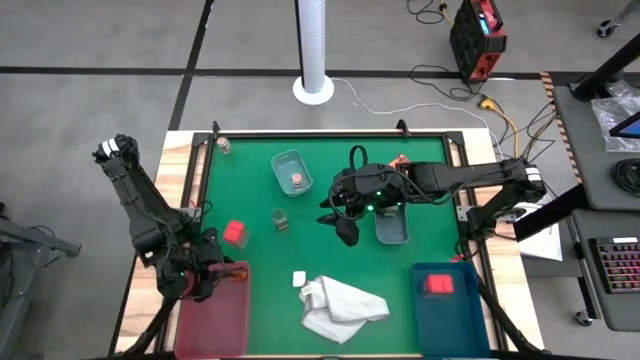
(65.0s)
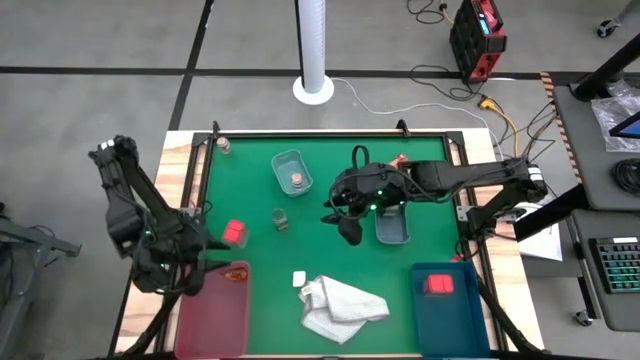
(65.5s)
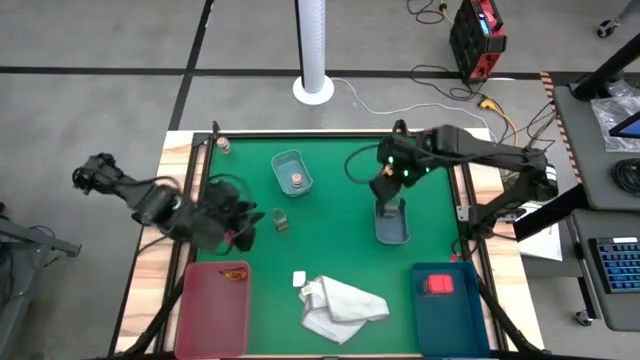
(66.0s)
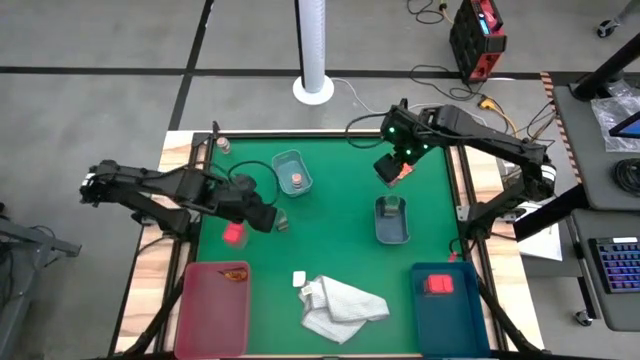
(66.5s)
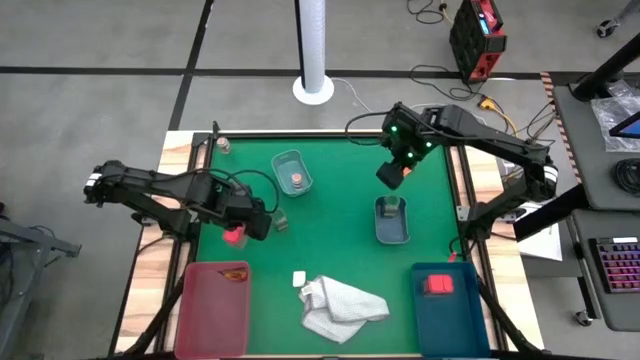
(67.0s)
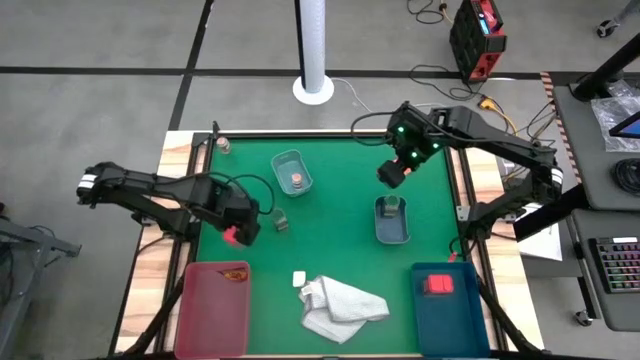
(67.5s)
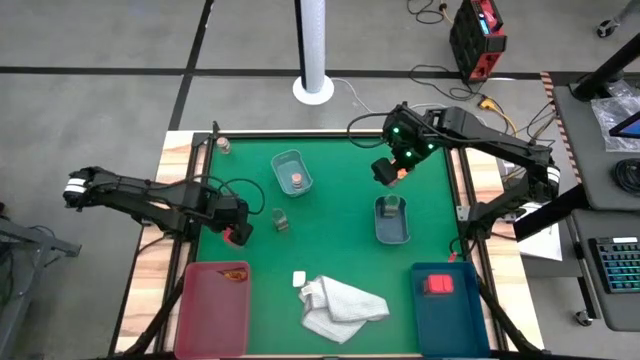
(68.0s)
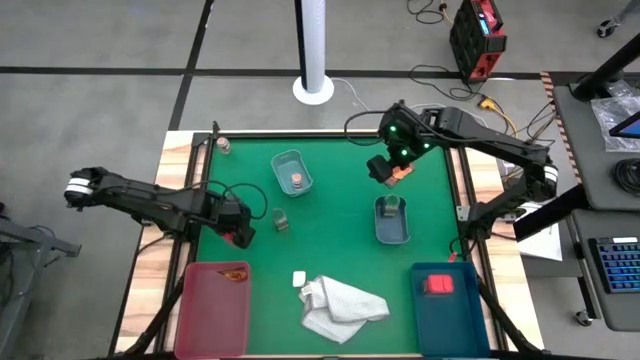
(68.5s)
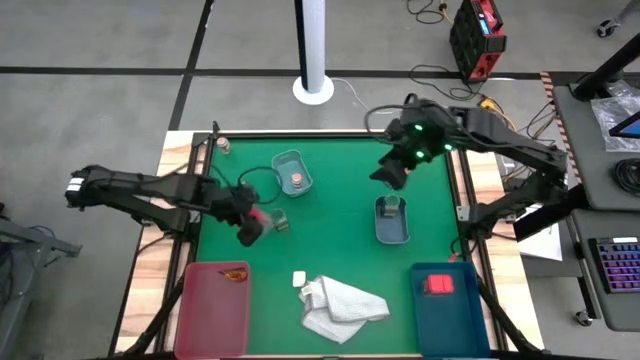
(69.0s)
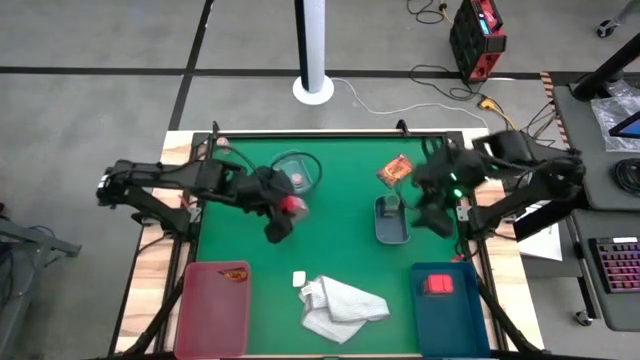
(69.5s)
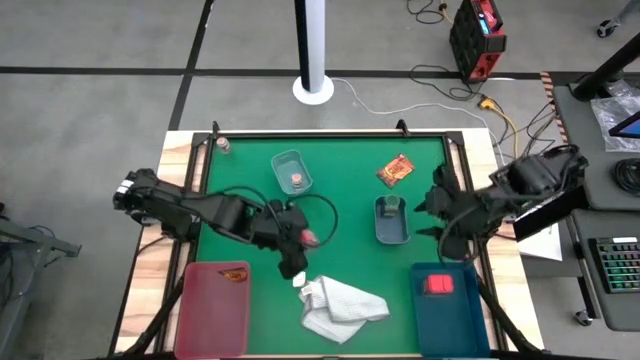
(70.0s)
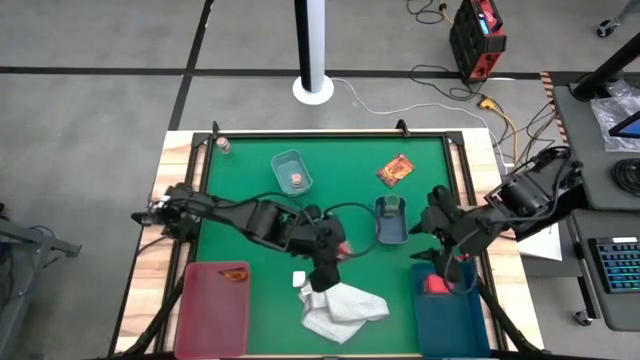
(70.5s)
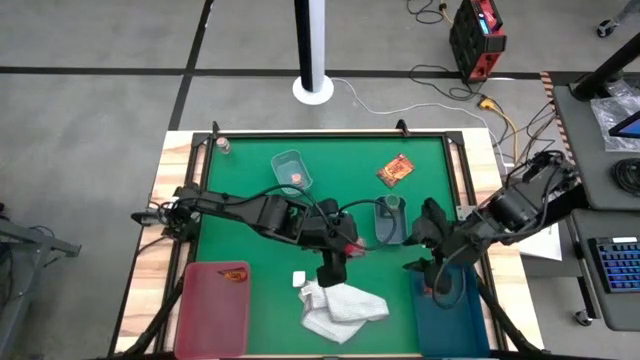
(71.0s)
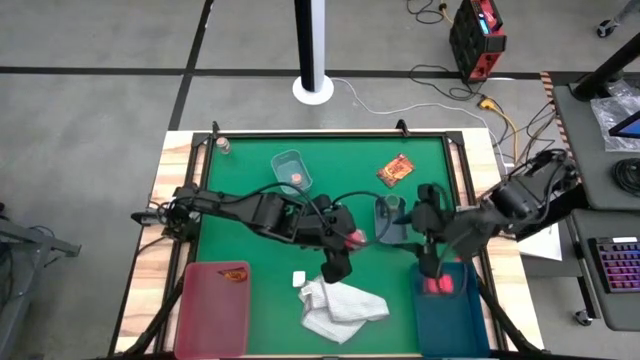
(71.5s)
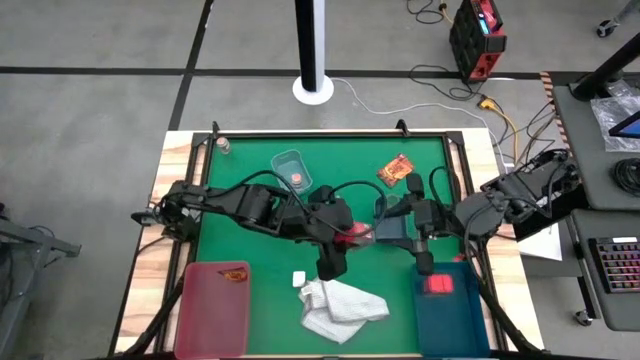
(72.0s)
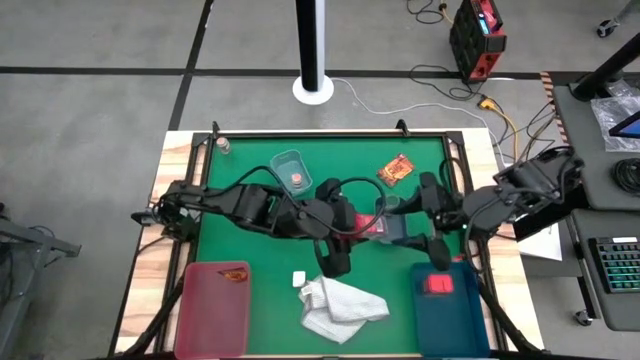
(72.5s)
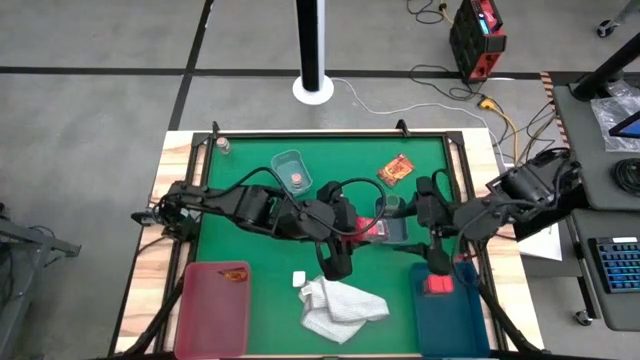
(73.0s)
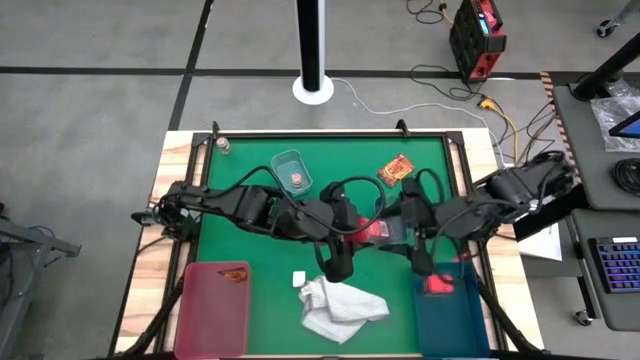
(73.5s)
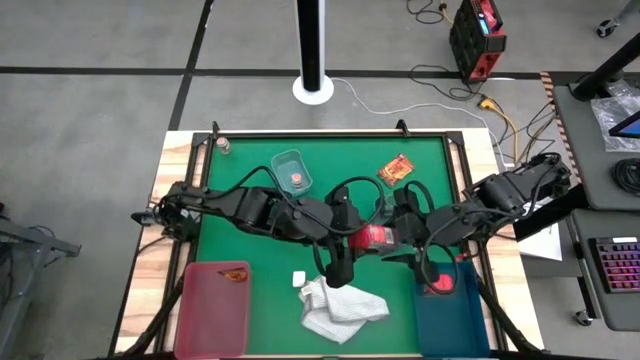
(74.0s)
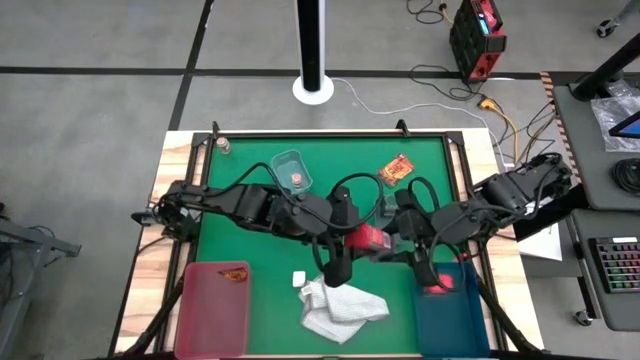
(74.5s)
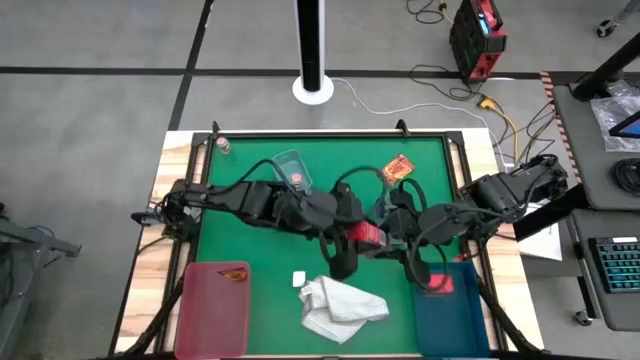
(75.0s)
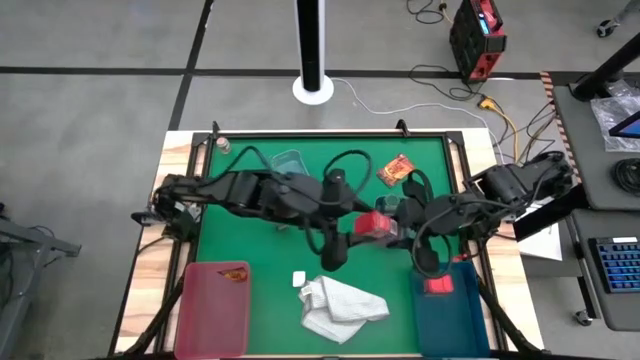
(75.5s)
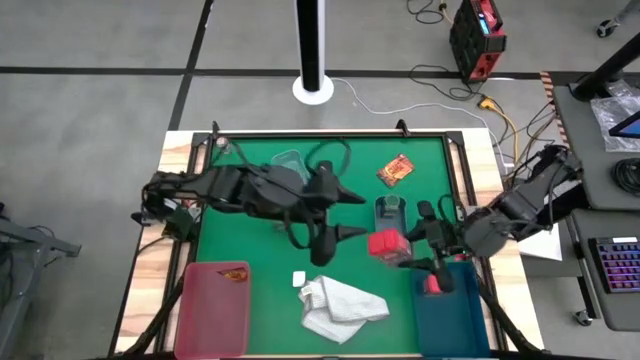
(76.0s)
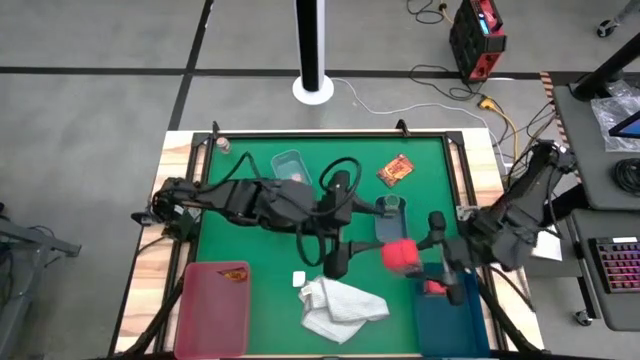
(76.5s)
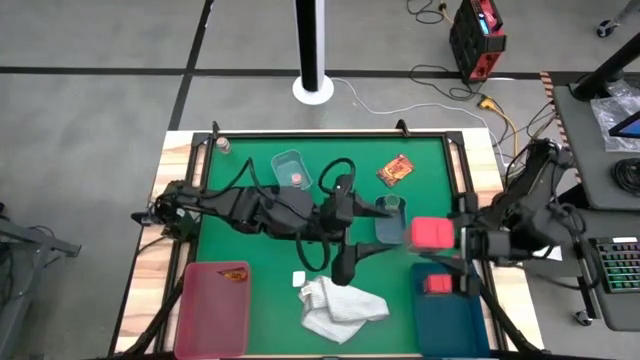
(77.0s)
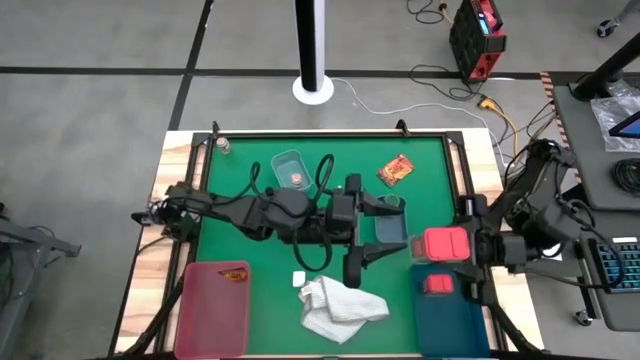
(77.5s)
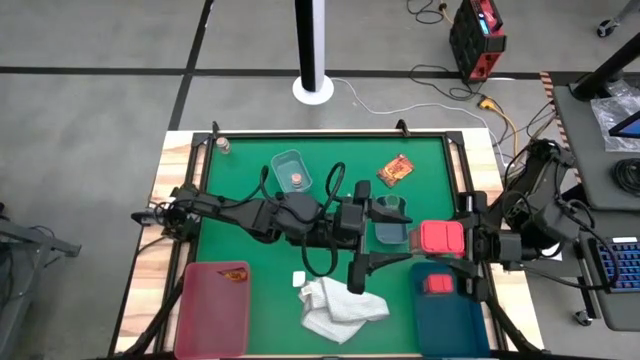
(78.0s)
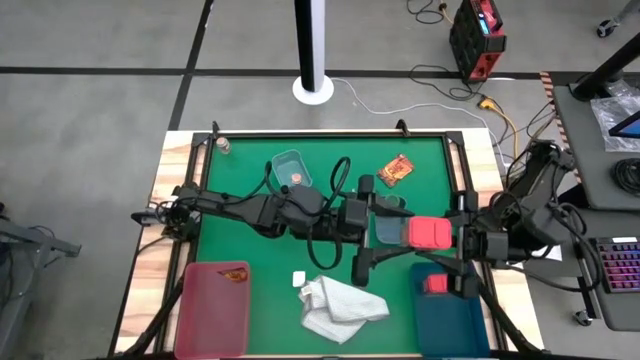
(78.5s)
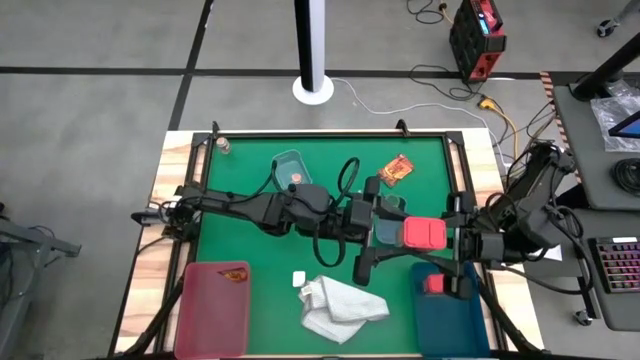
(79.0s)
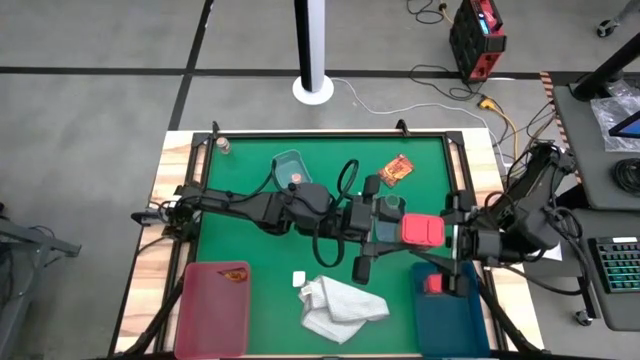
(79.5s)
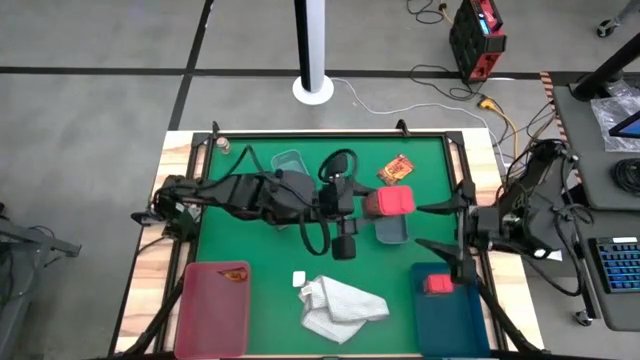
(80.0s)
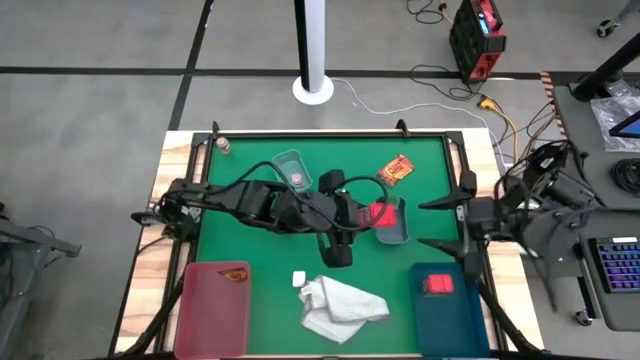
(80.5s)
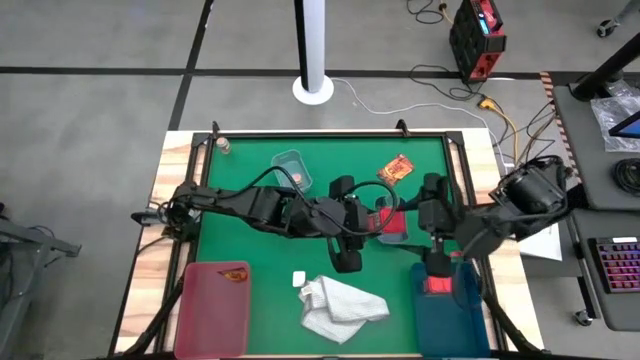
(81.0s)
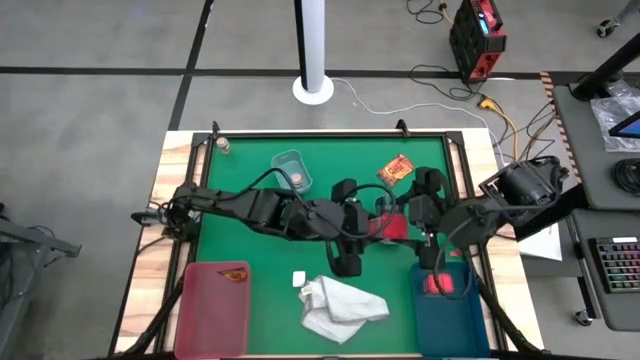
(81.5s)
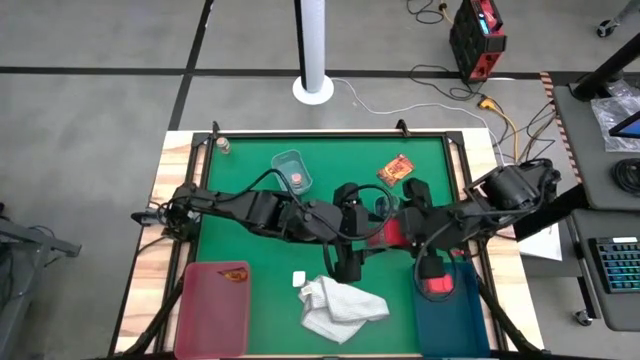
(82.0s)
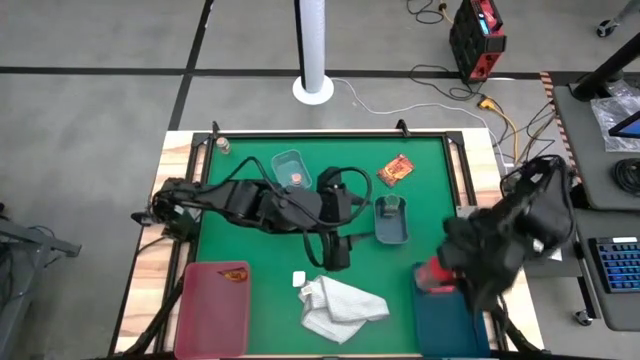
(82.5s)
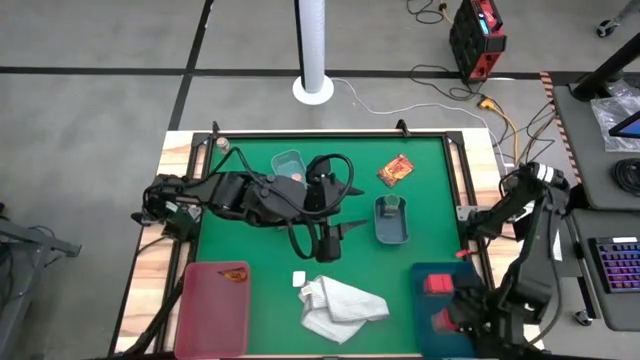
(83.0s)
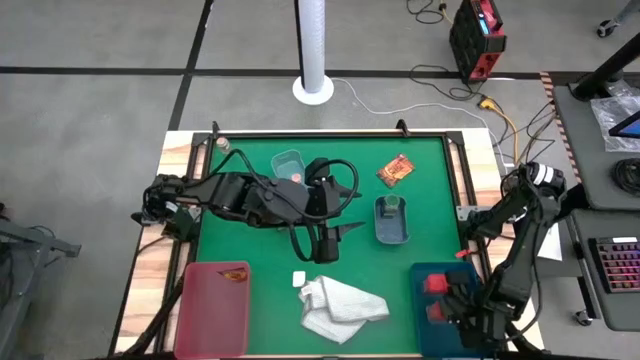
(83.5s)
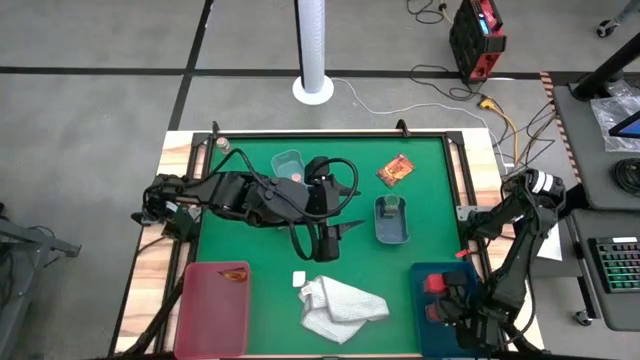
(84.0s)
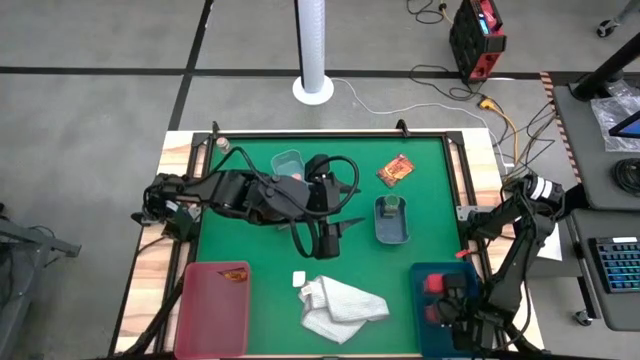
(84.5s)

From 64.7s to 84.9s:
Task: Sort spices by type
Put the red spice bottle into the dark blue bin

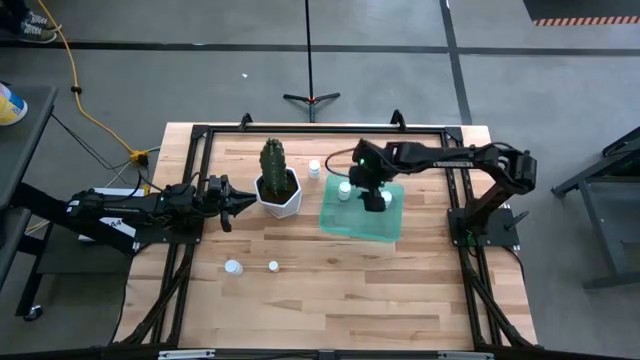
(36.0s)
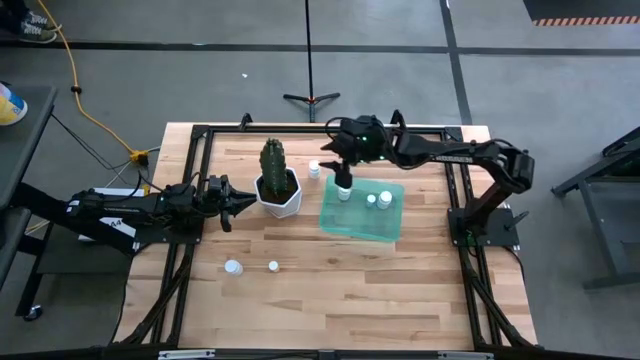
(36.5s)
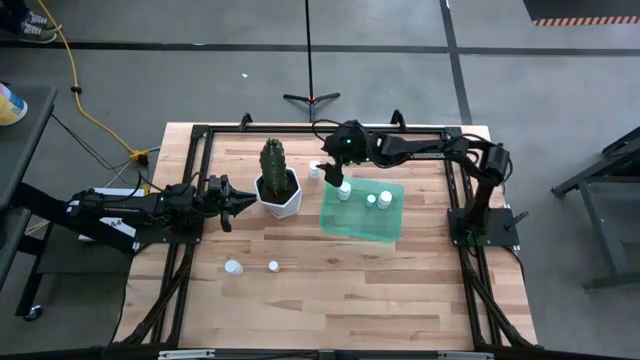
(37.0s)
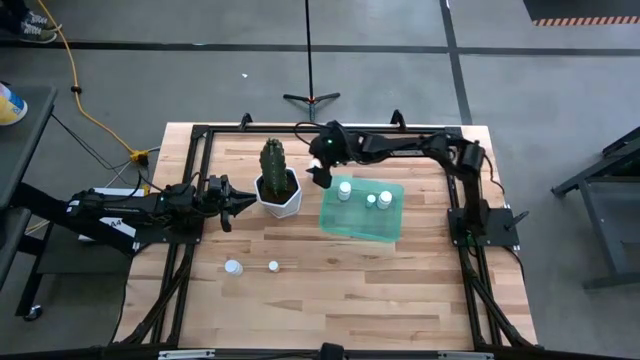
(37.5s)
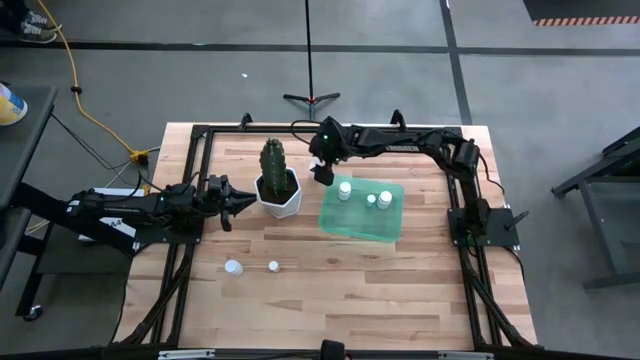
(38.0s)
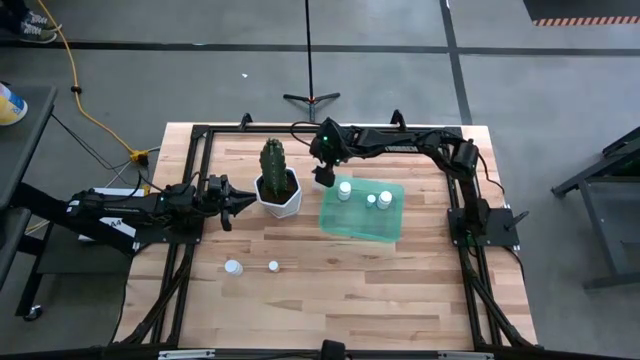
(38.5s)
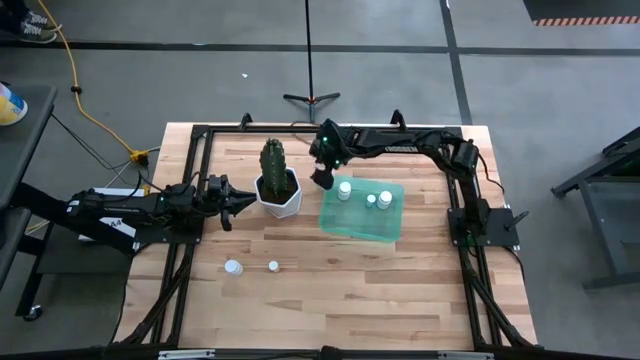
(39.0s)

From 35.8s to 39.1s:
Task: Pick and place pill bottles into a basket
Put the white pill bottle into the light green bin
